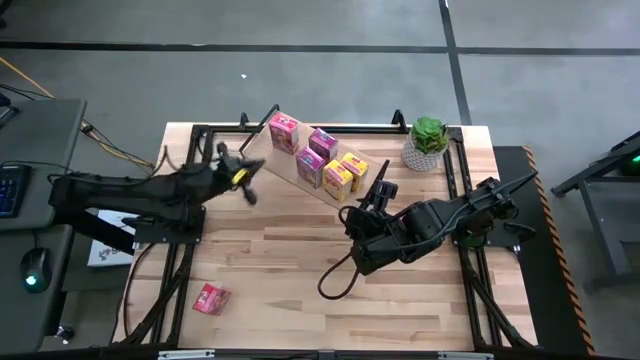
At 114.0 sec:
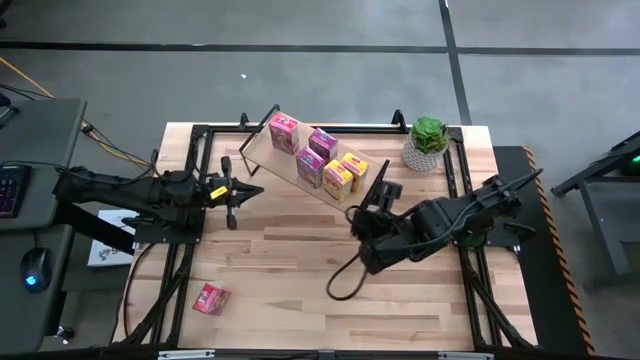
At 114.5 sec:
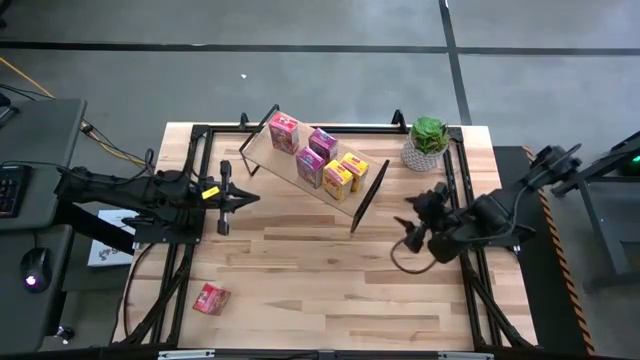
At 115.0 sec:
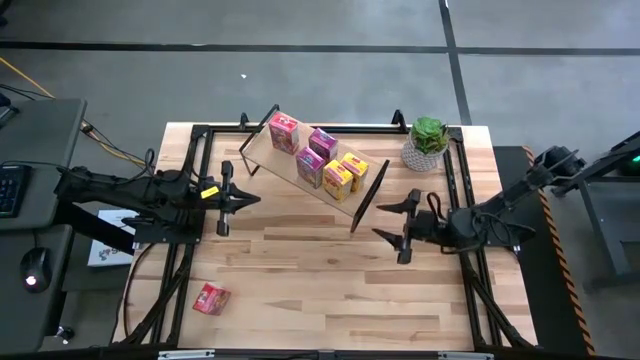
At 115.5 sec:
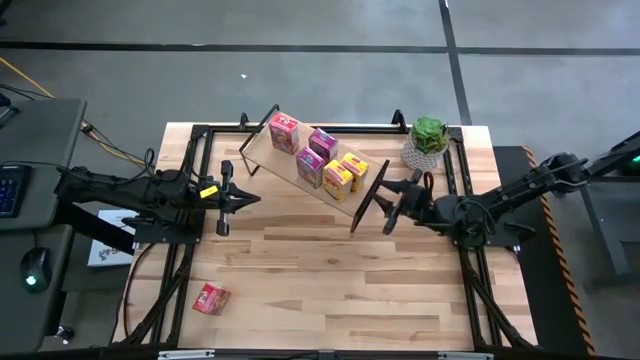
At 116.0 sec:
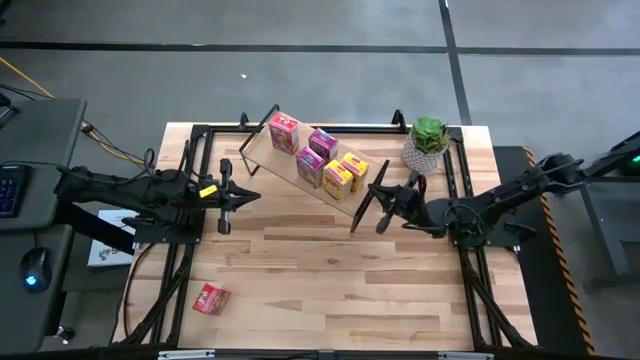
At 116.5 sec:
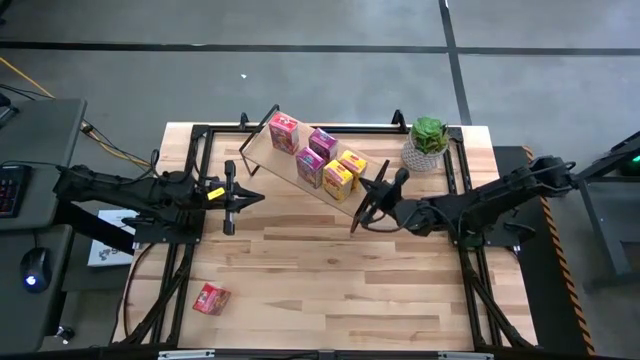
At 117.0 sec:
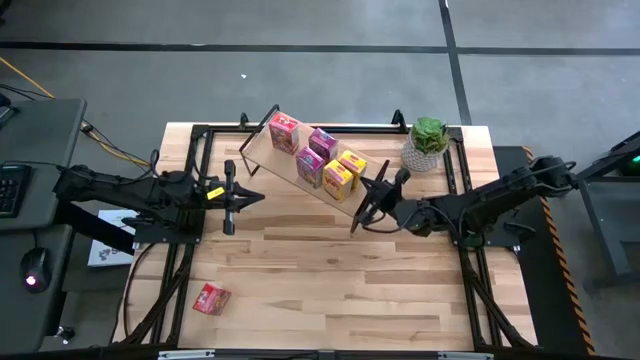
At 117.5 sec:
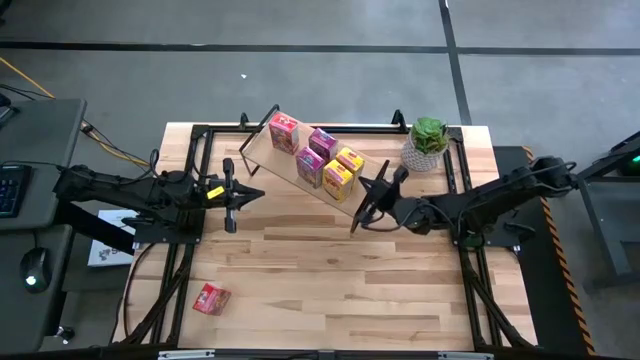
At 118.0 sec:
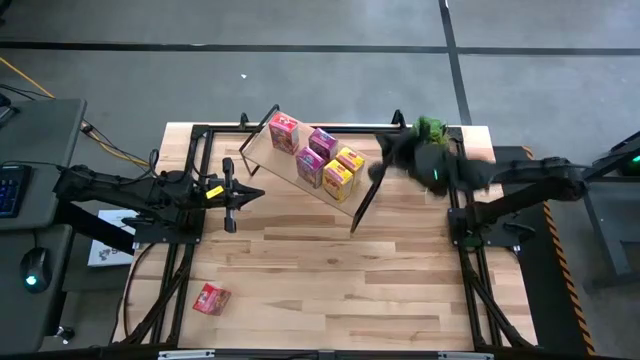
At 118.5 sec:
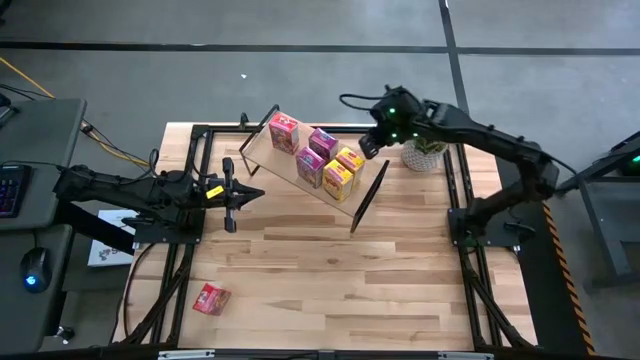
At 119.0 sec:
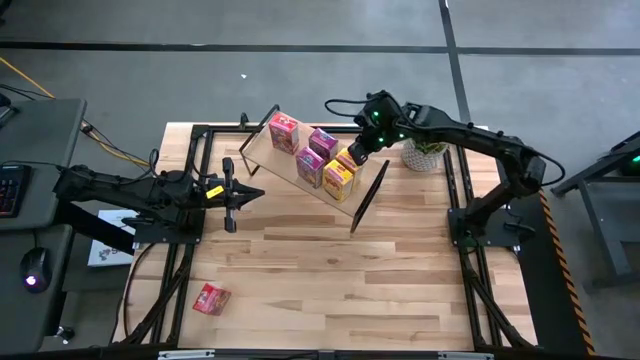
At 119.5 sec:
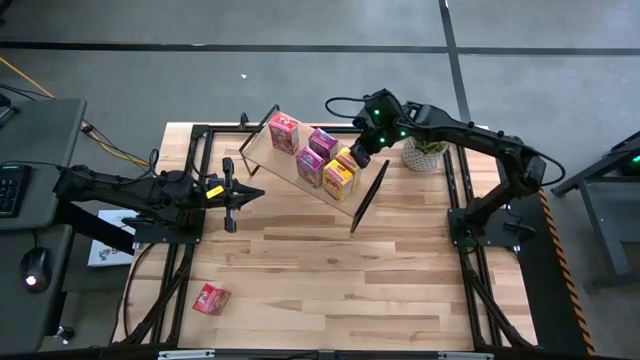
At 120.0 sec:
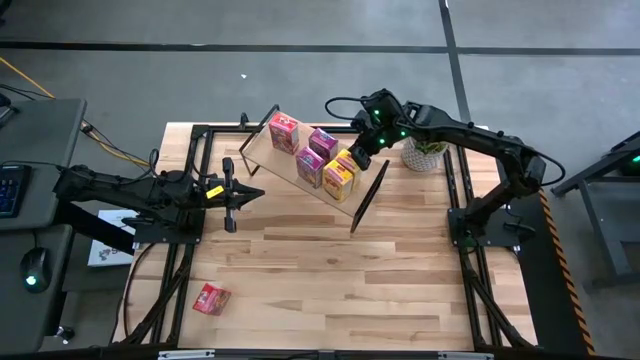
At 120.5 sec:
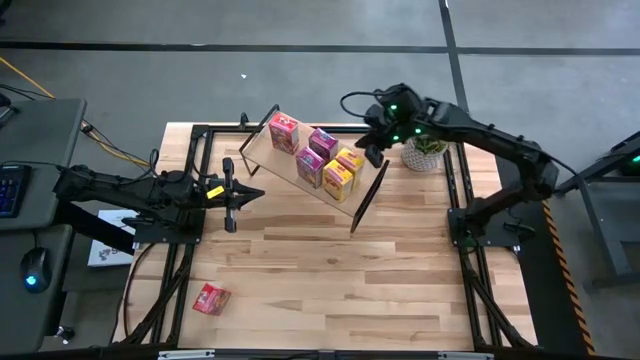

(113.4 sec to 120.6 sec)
Task: Stack cereal on shelf
Adjust the yellow cereal box on the shelf

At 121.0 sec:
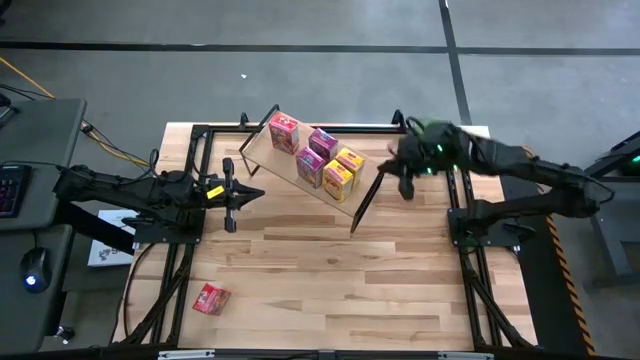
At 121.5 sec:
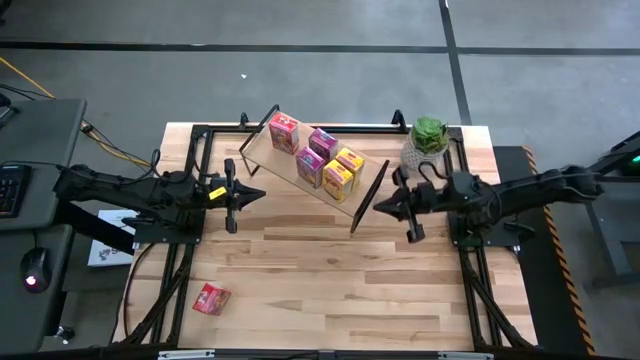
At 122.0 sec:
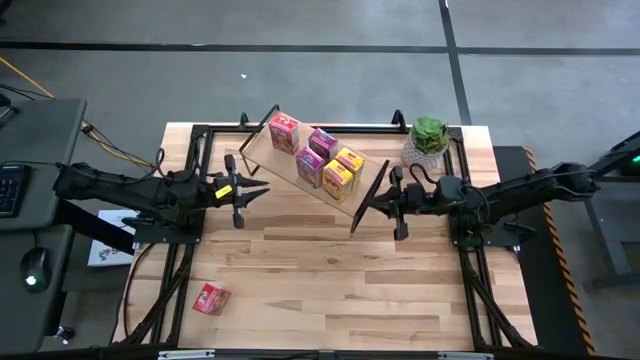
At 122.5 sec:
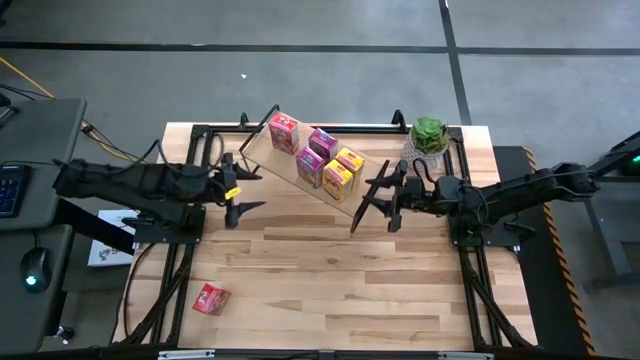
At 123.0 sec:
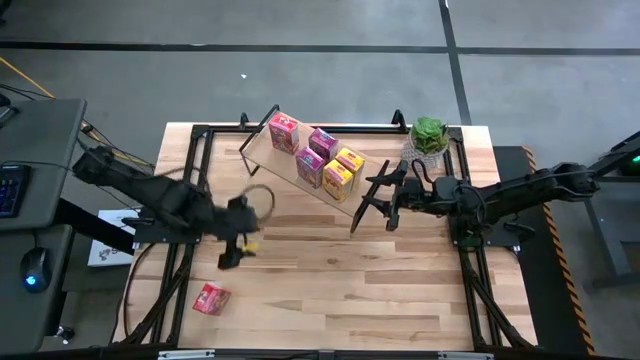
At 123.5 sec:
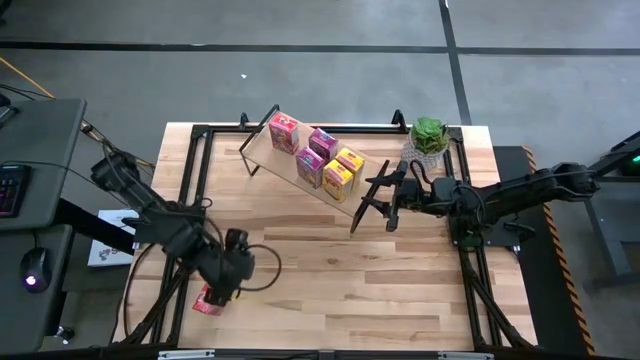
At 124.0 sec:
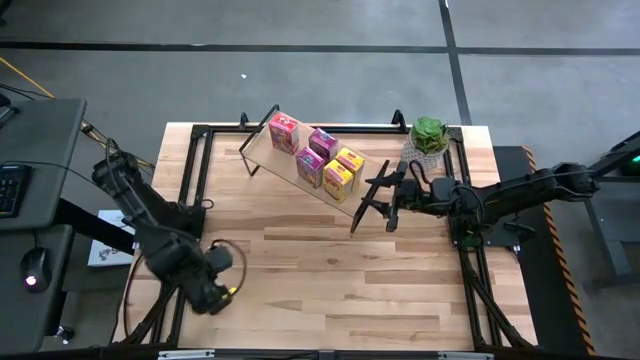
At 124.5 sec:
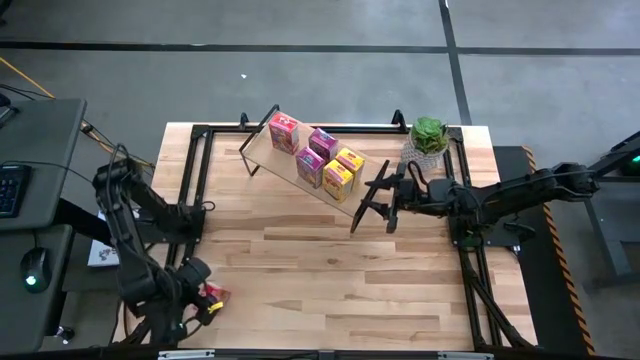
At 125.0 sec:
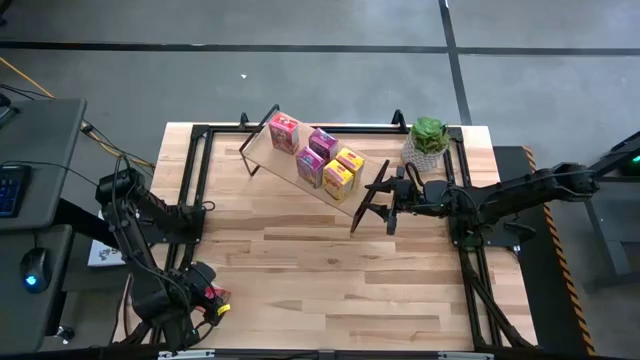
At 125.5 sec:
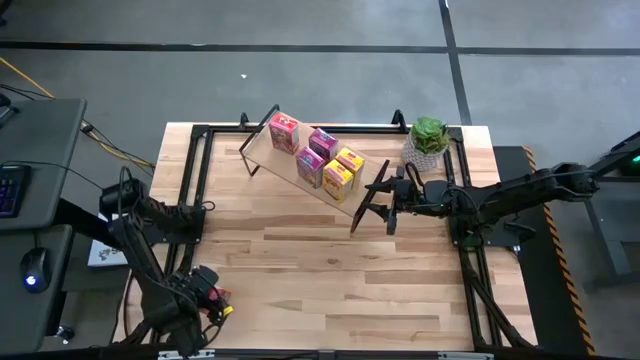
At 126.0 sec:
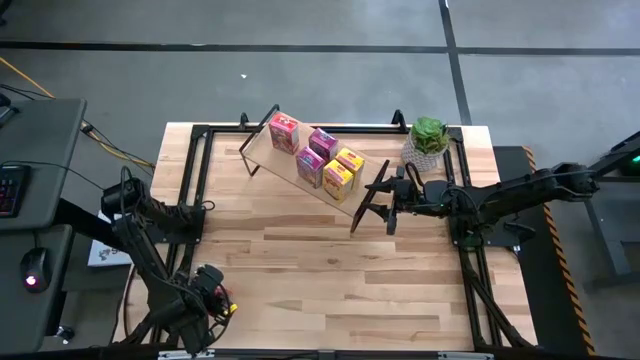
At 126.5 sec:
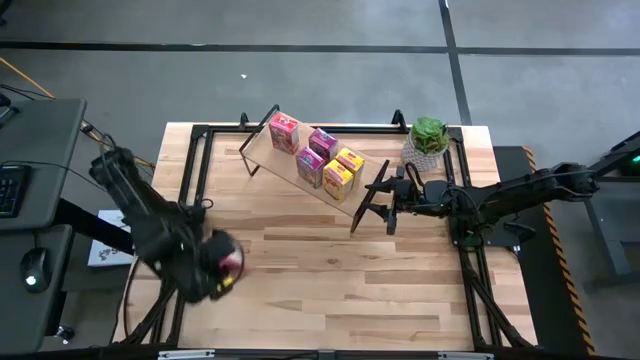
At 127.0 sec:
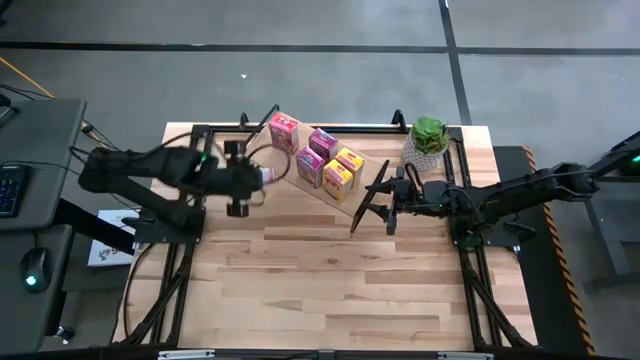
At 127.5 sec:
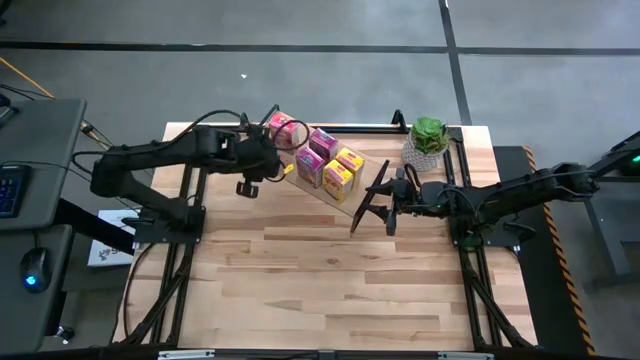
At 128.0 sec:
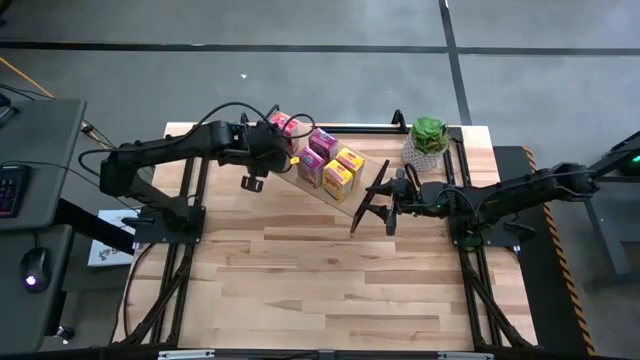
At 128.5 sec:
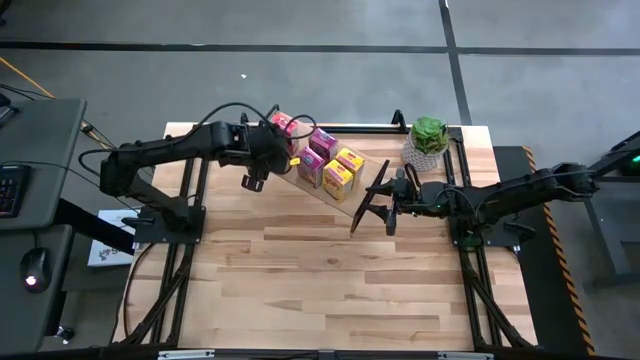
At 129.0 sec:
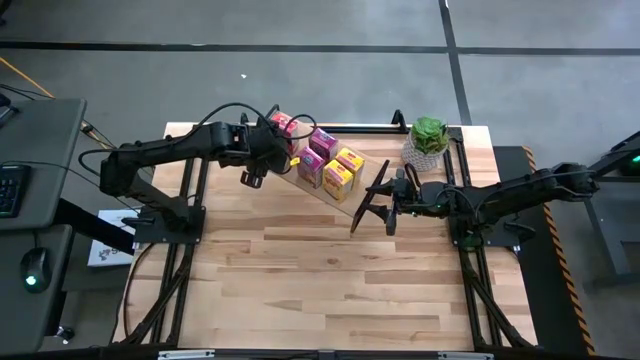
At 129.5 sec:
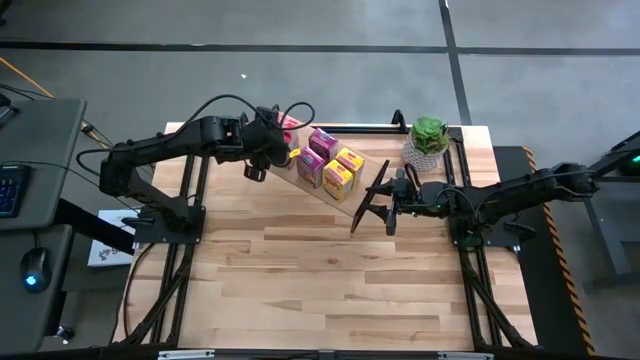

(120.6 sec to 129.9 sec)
Put the red cereal box aligned with the other red cereal box on the shelf

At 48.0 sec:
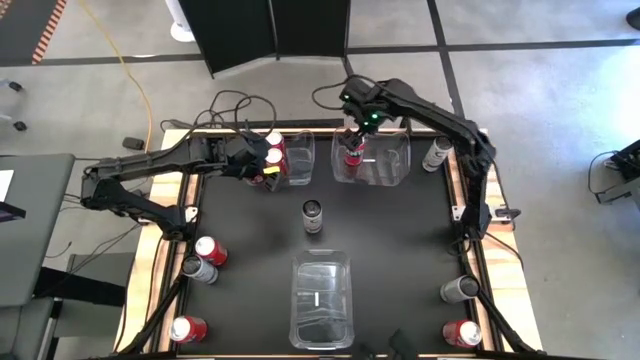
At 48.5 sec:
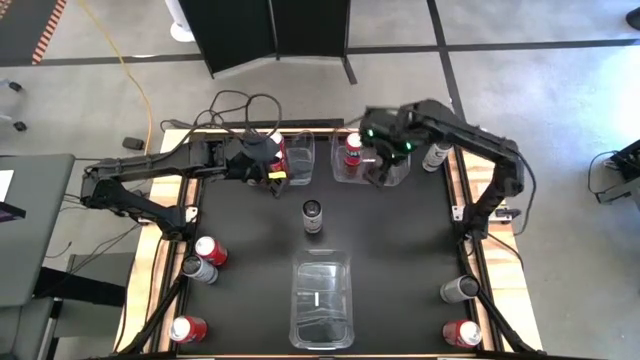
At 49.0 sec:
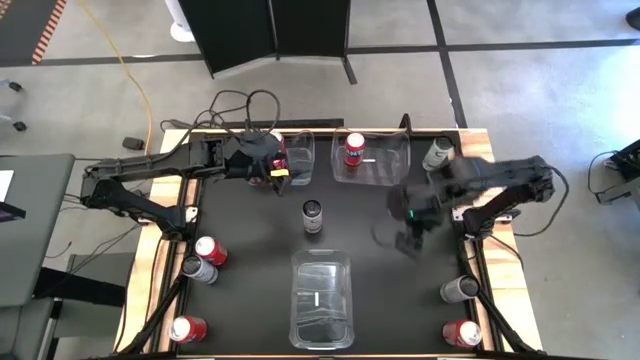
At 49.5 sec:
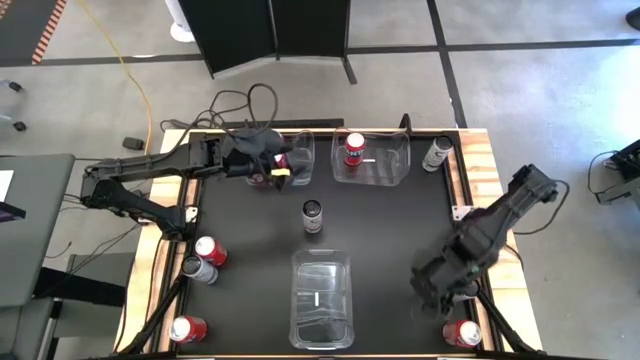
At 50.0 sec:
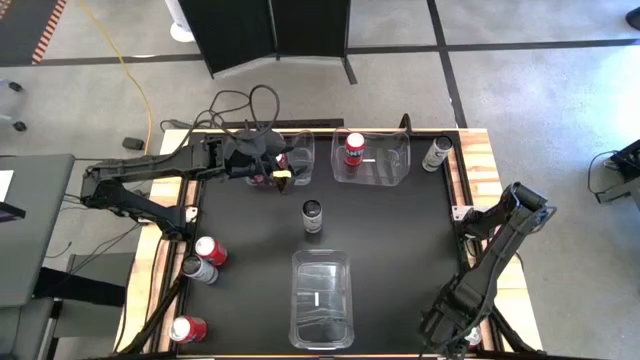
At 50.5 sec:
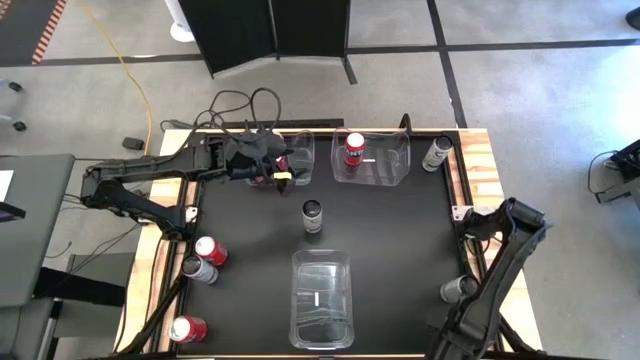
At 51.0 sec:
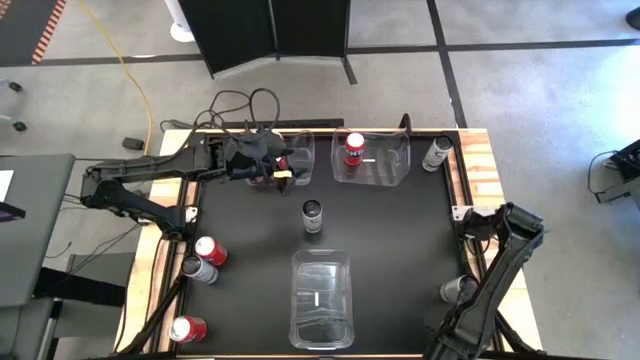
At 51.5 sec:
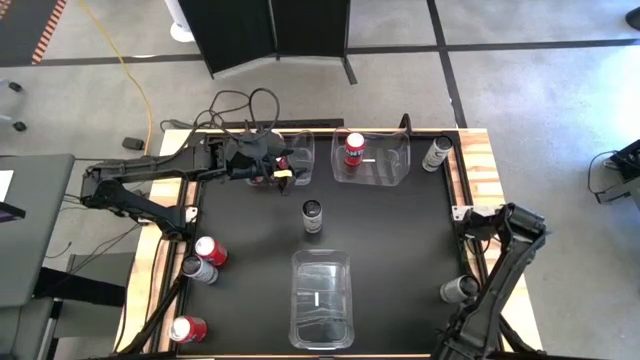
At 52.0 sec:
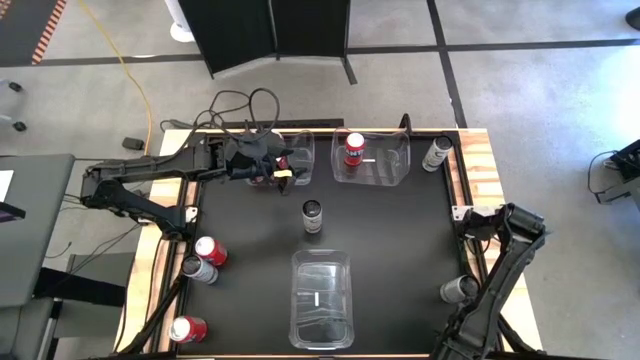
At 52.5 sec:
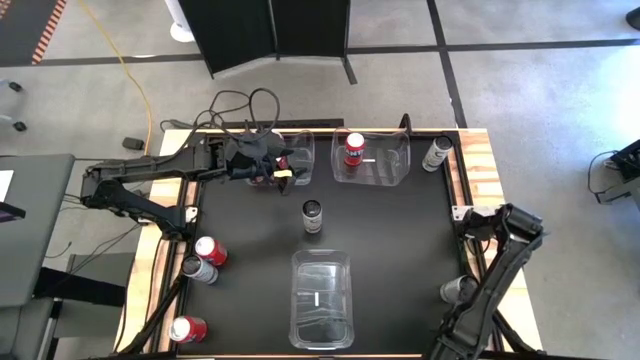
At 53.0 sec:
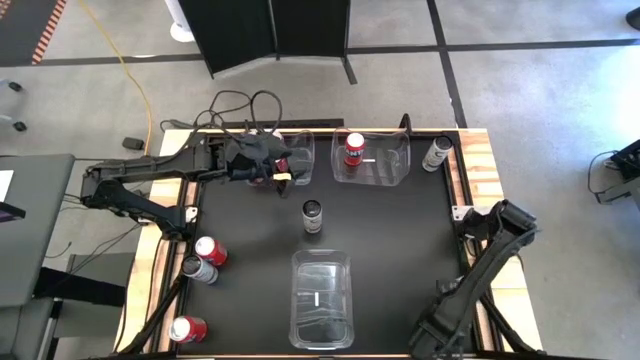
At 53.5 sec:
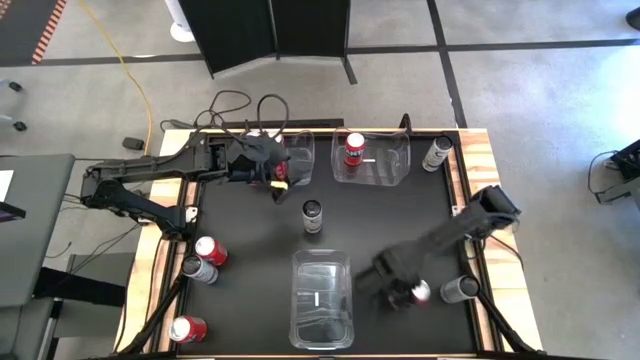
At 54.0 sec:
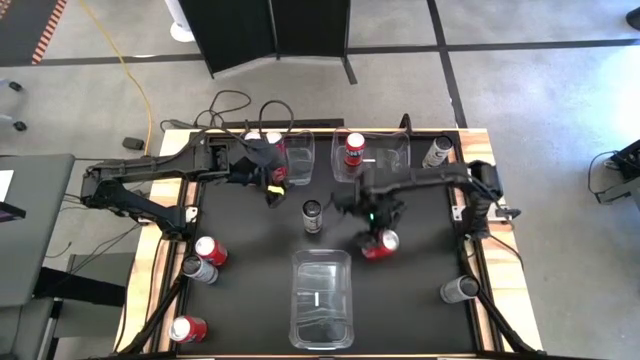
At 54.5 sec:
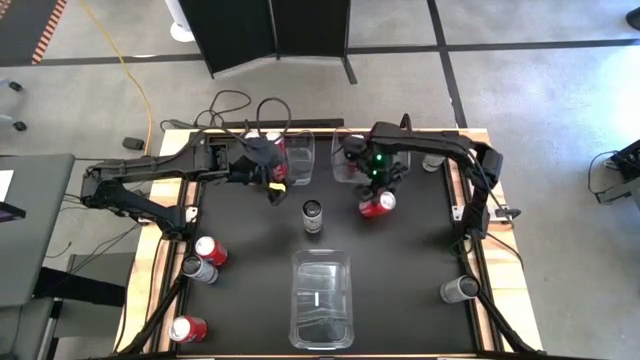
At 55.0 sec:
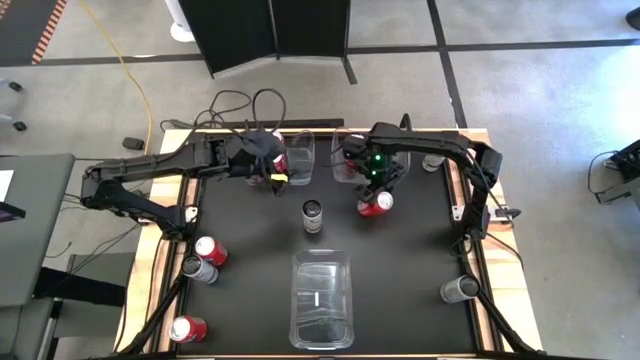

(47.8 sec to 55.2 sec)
Task: Sort soda cans
Put the orange soda can into the right transparent bin
